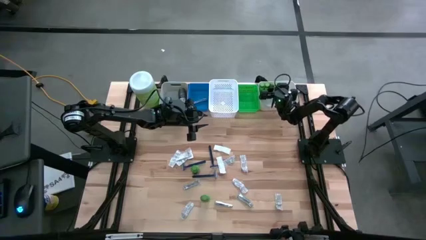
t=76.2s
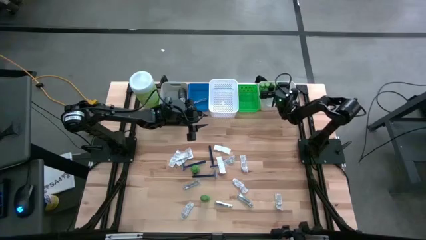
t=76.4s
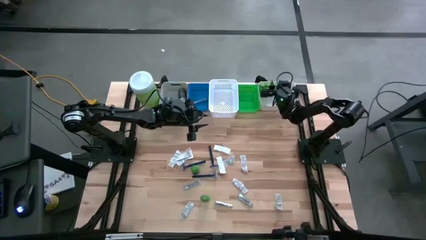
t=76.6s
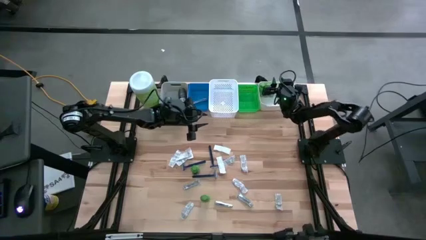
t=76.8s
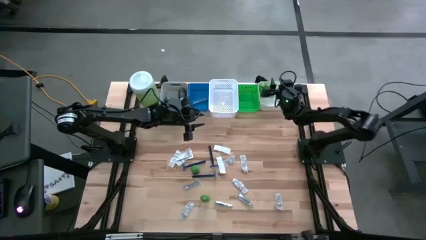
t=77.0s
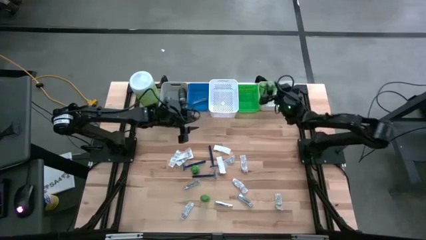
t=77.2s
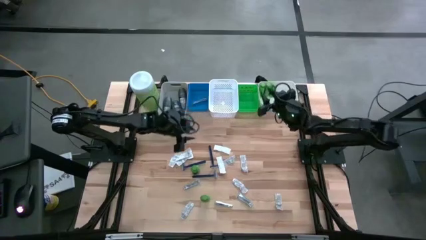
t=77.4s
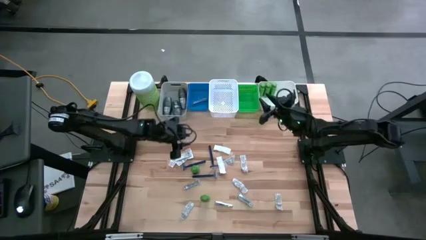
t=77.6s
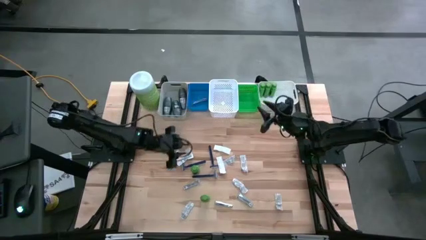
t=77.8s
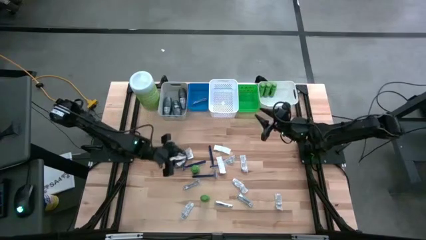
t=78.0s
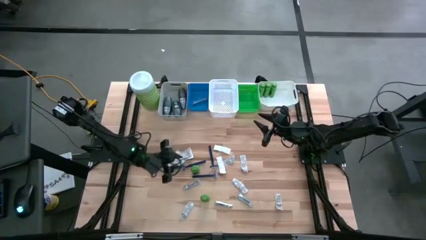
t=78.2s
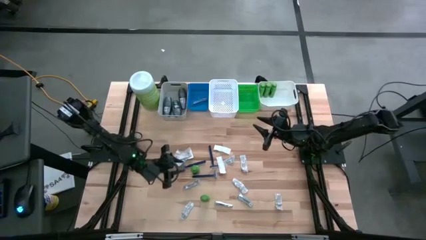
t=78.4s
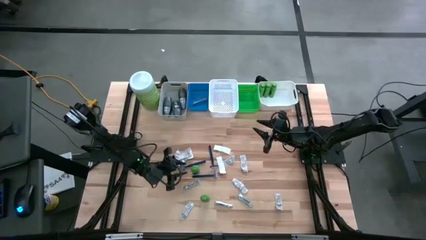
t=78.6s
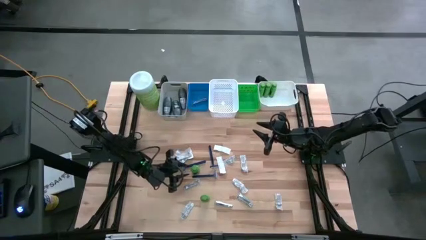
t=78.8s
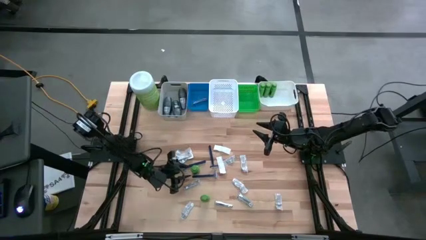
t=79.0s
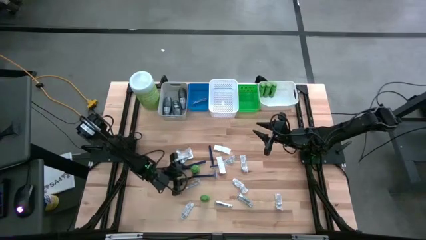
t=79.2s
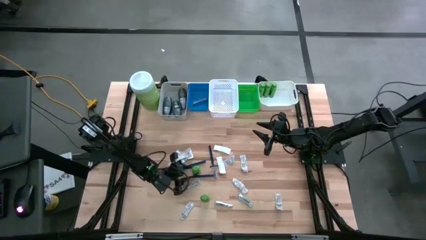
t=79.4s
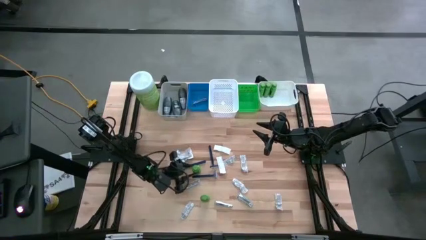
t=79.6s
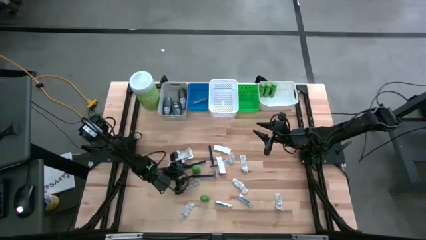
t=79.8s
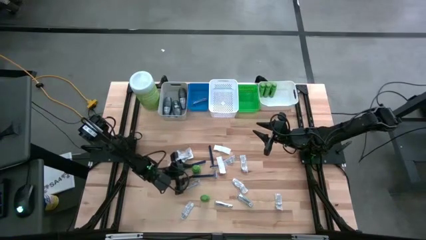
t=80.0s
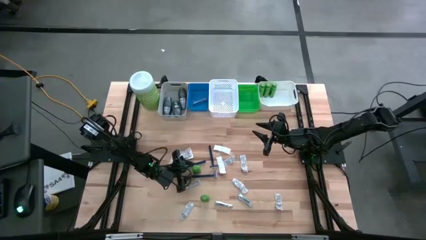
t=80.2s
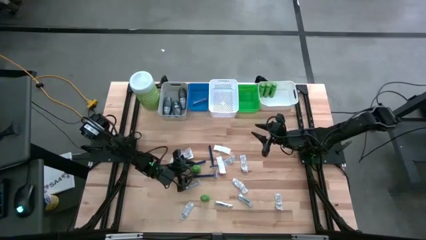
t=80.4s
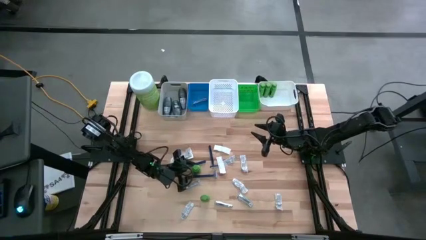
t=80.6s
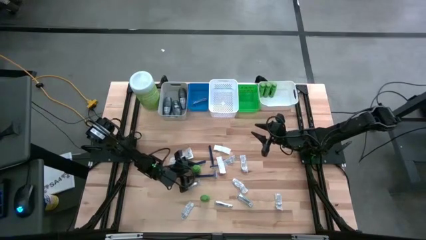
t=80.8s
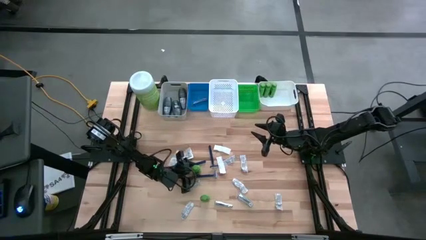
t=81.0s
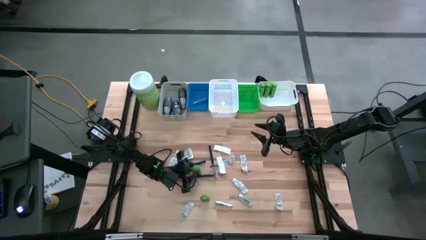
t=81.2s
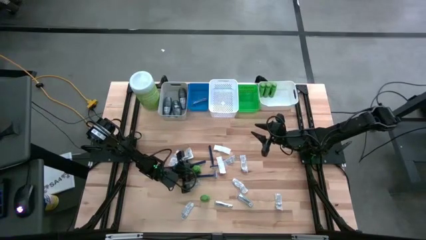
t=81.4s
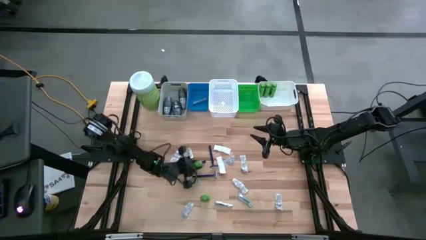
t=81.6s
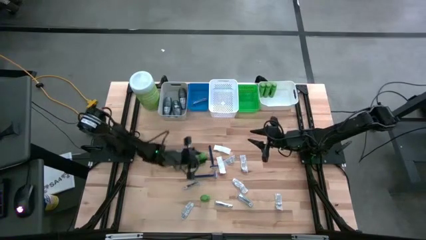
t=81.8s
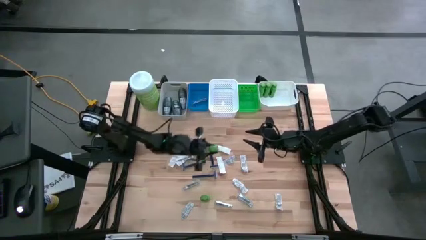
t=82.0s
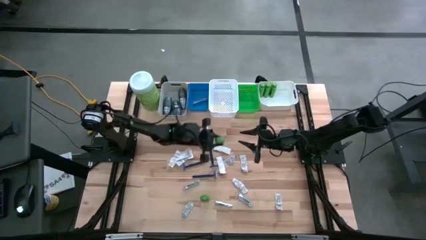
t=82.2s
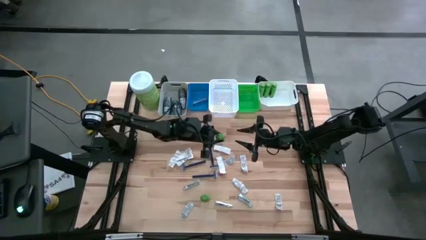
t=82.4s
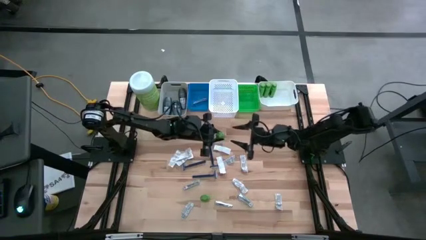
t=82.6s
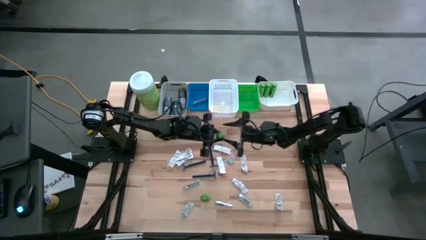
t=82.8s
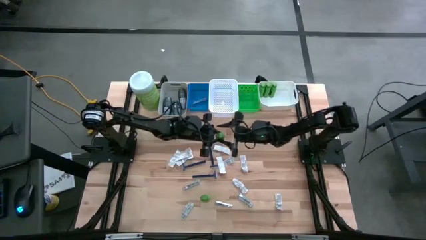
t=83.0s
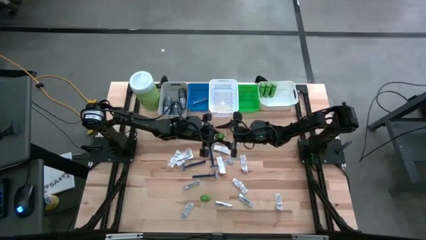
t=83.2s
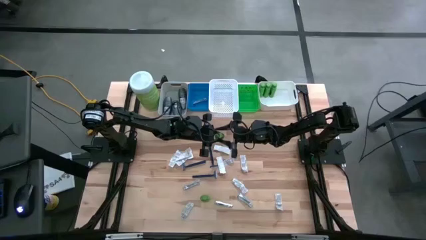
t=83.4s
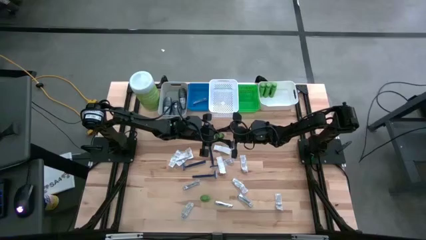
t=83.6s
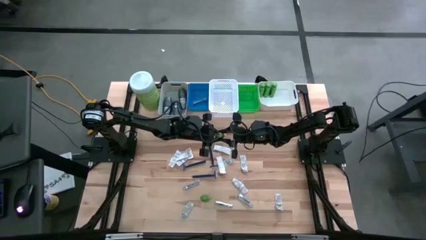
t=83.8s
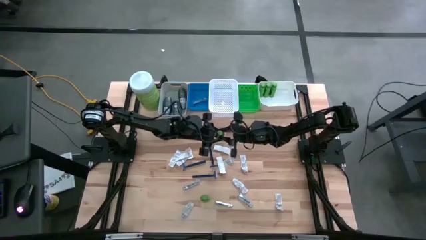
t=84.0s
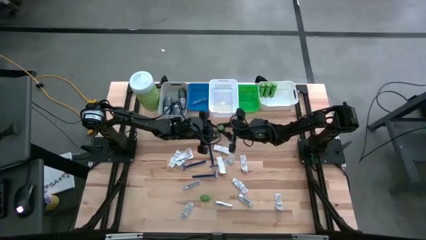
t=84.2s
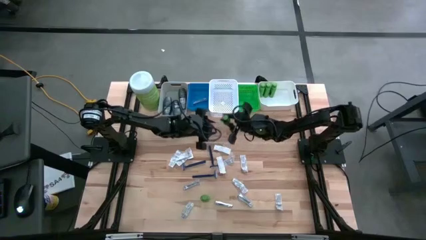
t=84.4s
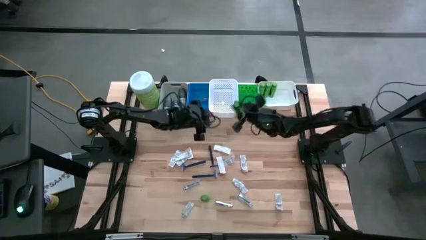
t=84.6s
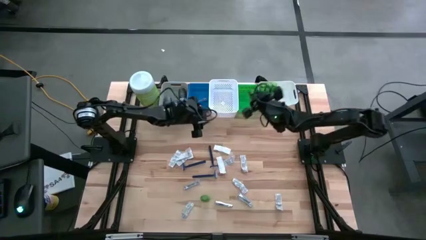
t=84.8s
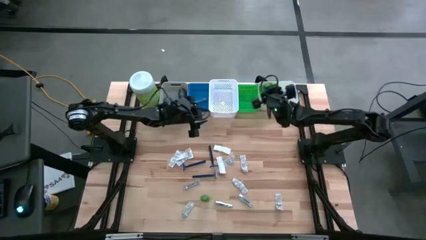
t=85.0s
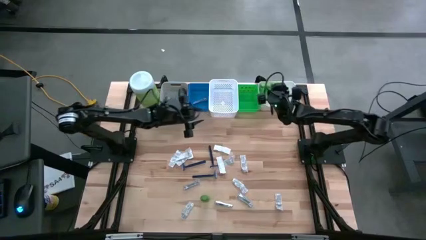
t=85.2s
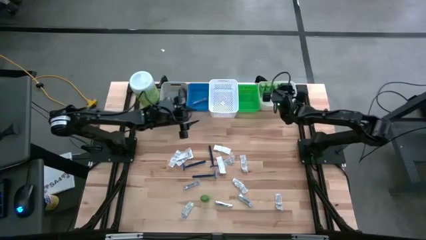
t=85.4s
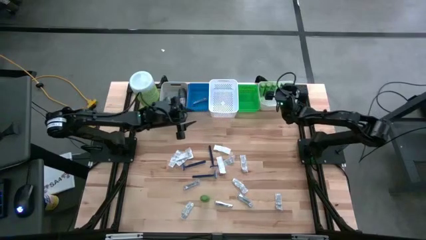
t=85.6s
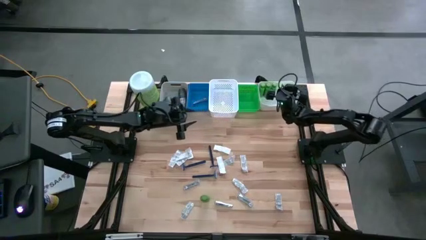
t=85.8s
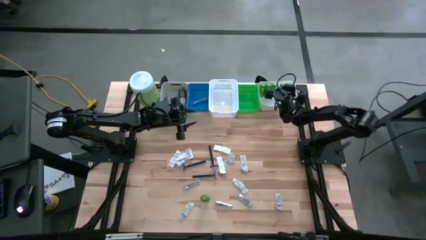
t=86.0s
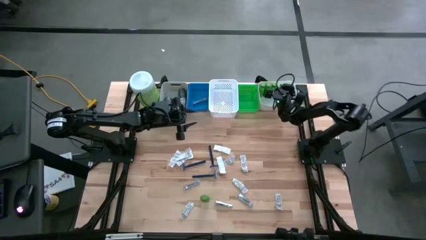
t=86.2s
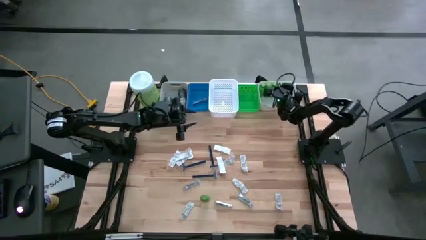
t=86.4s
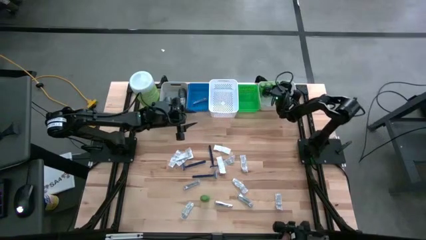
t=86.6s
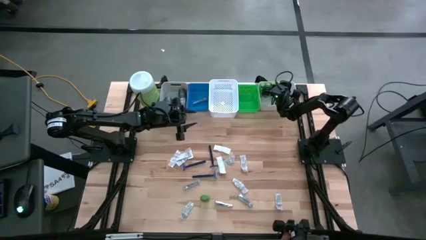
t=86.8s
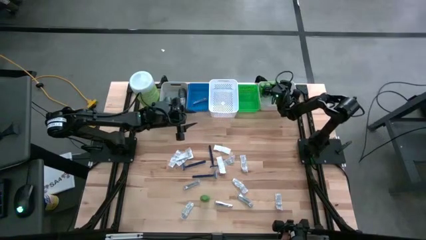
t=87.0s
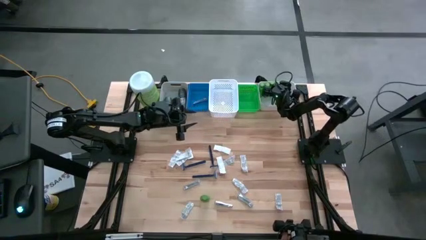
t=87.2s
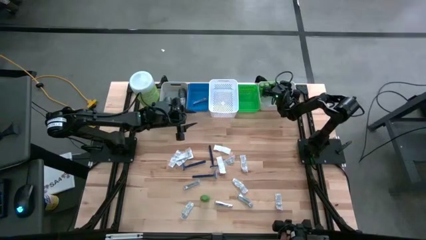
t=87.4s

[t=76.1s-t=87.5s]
Task: Pick & Place Travel size toiletries
Put the top green shampoo into the right white bin

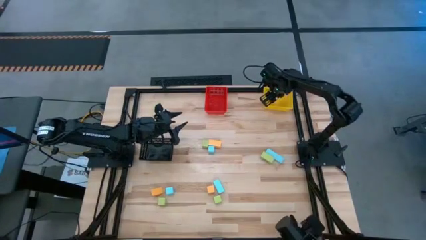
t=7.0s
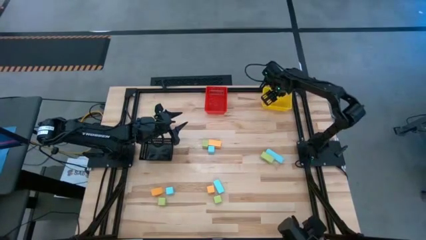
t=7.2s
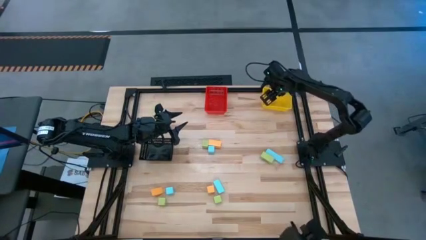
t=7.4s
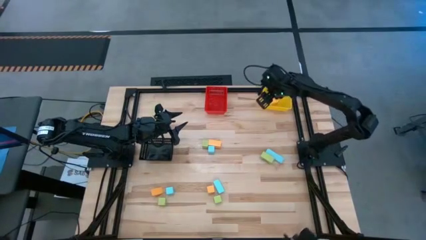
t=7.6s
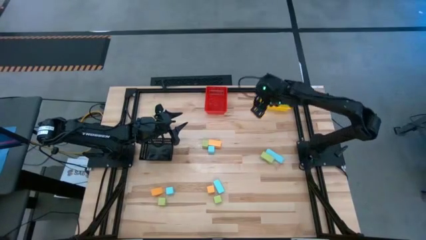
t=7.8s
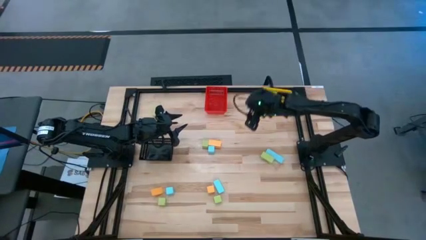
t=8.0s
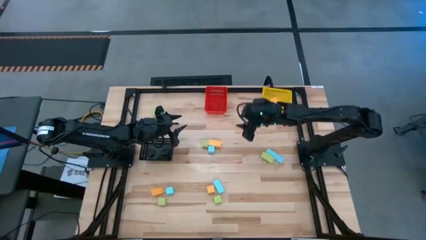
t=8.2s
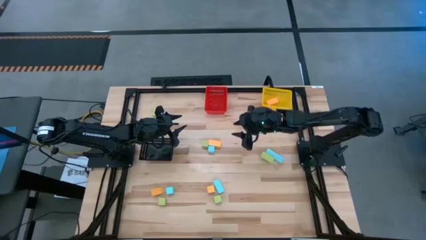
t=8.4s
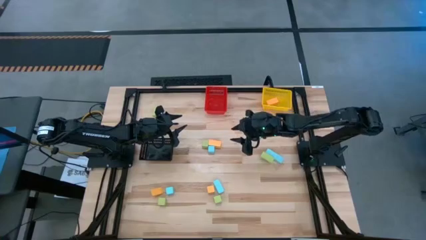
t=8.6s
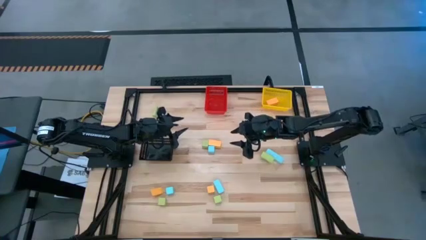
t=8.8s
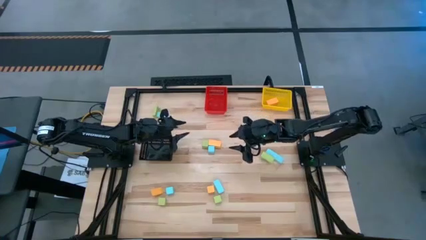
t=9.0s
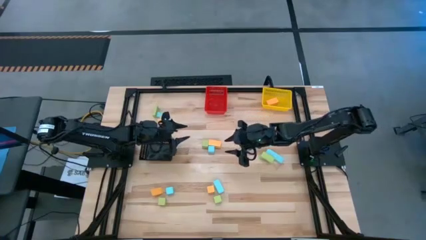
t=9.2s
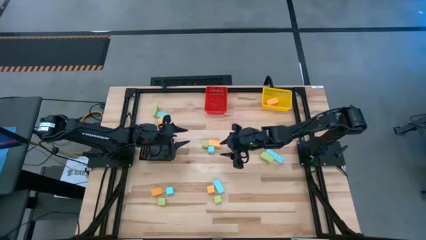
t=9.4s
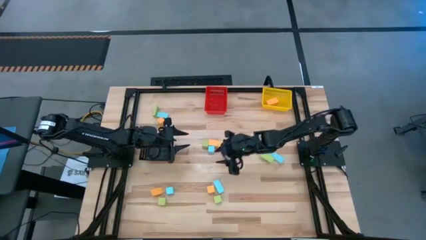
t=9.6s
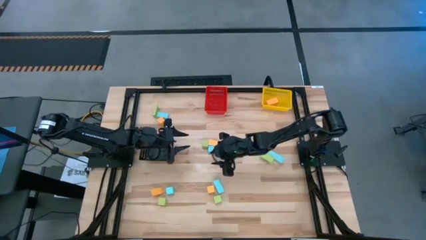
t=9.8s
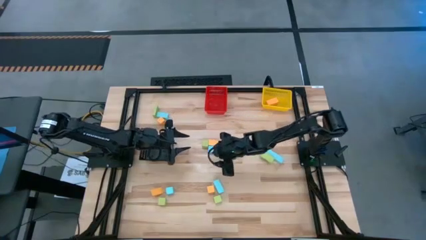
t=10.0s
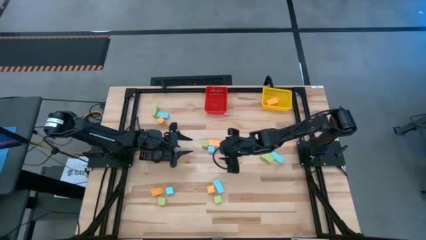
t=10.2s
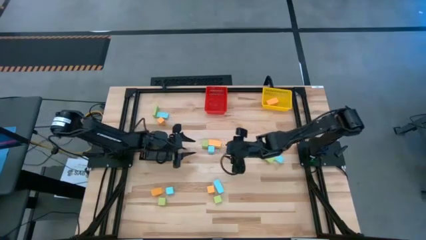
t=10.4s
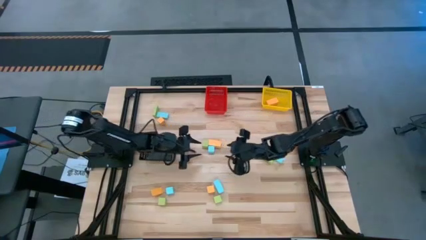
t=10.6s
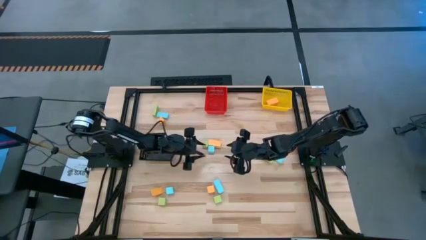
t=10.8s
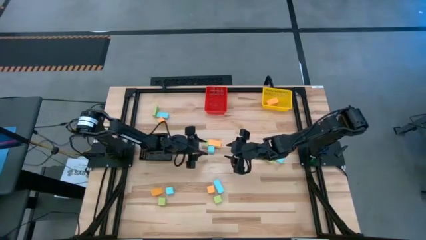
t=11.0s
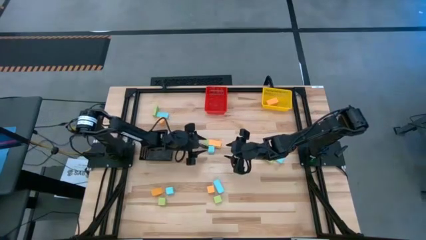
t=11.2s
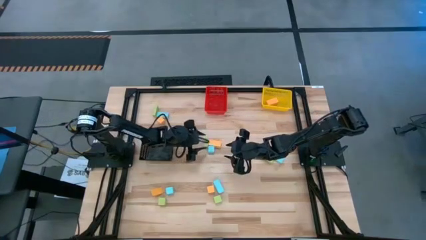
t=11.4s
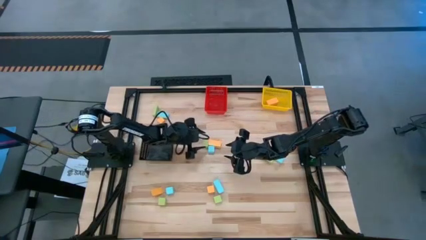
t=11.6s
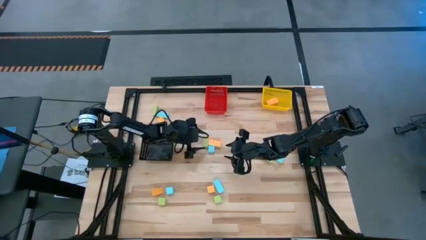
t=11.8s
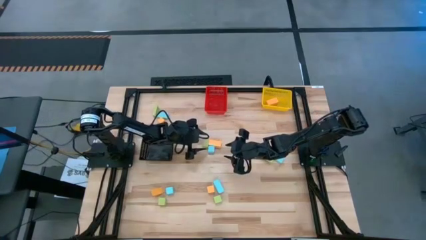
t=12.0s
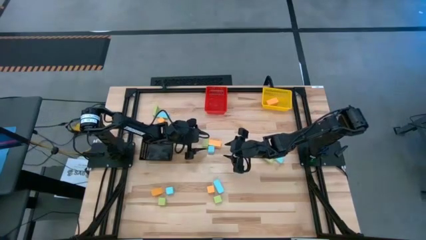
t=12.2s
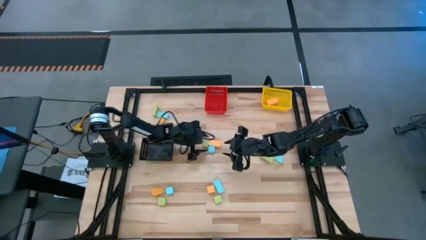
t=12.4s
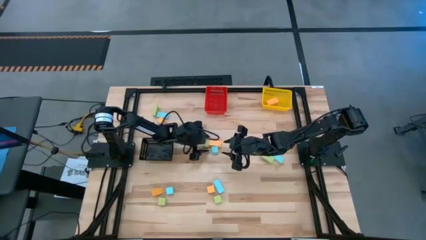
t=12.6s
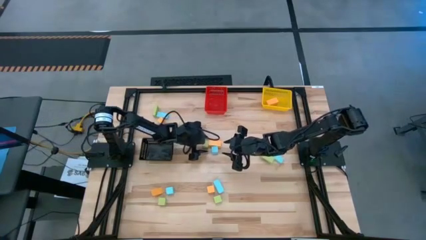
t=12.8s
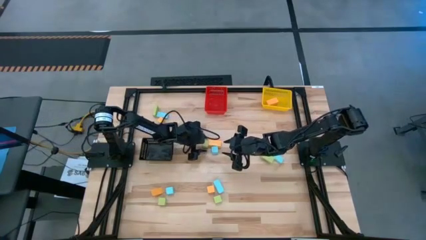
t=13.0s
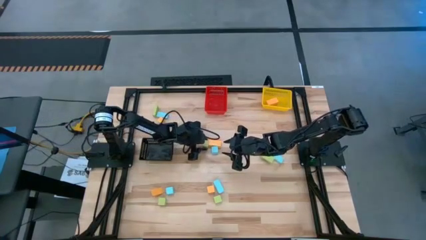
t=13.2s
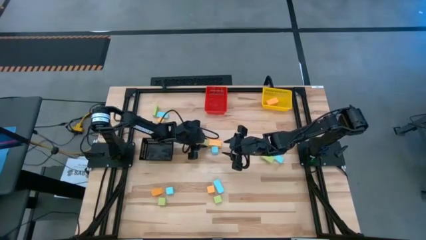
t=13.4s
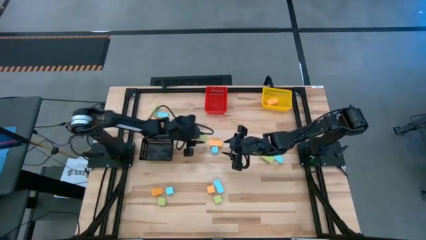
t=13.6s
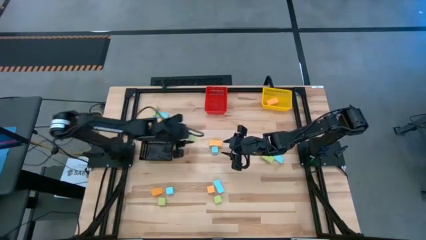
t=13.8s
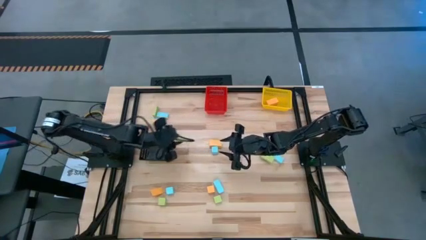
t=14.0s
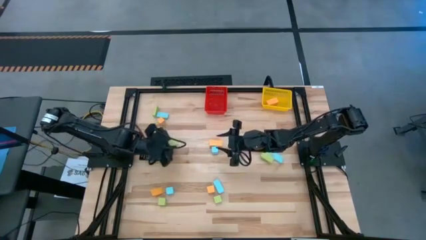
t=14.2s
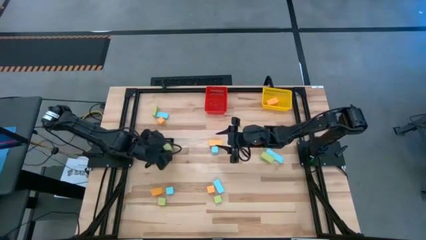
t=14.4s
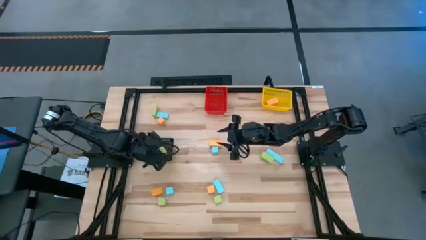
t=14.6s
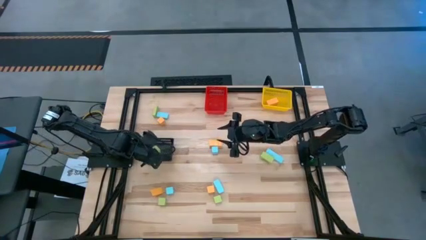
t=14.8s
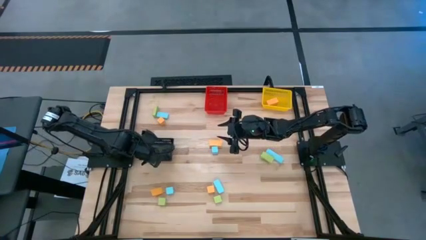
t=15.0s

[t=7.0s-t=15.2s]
Task: Sort & place blocks by color
Put the green block into the black bin
